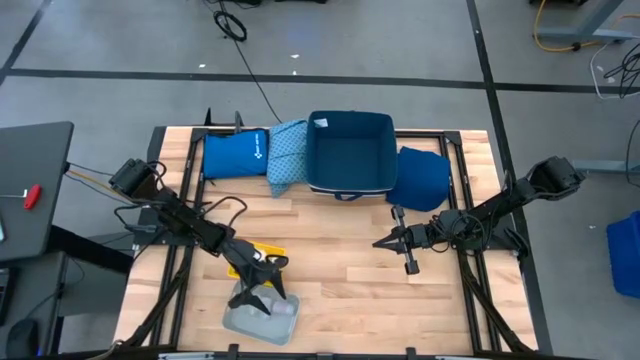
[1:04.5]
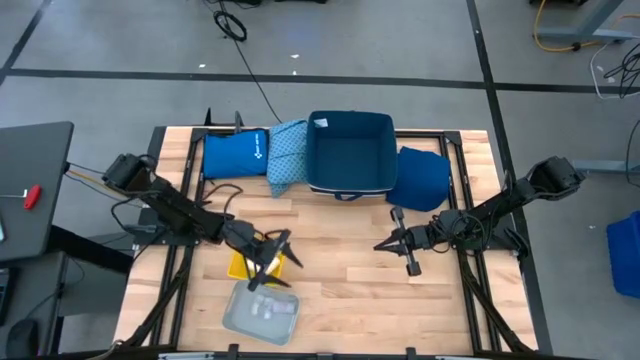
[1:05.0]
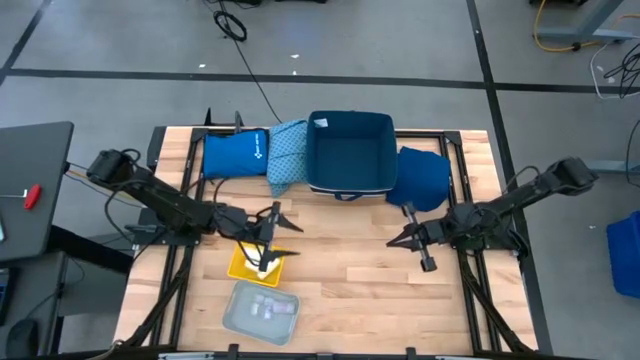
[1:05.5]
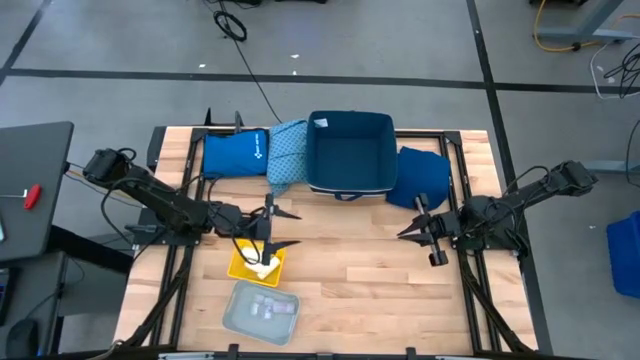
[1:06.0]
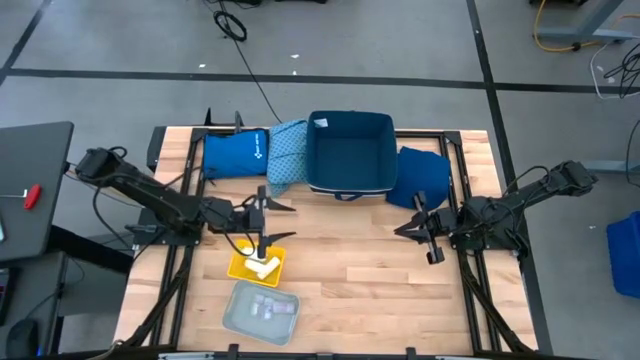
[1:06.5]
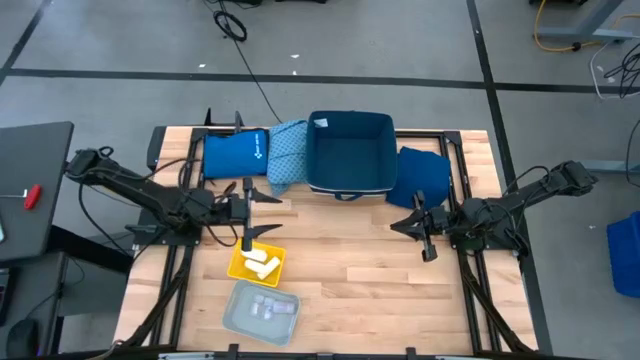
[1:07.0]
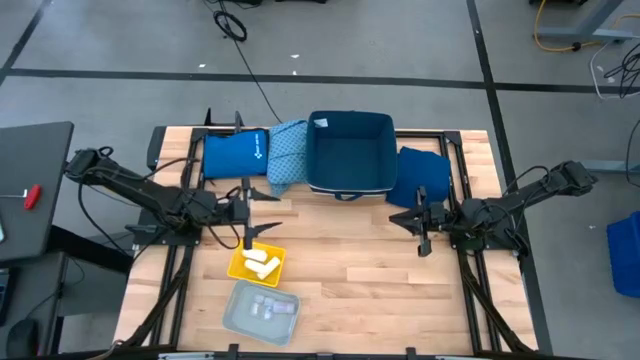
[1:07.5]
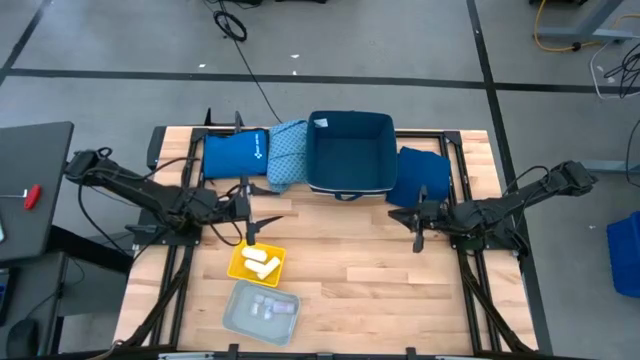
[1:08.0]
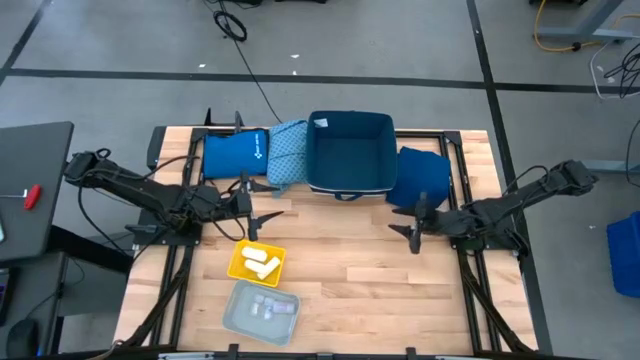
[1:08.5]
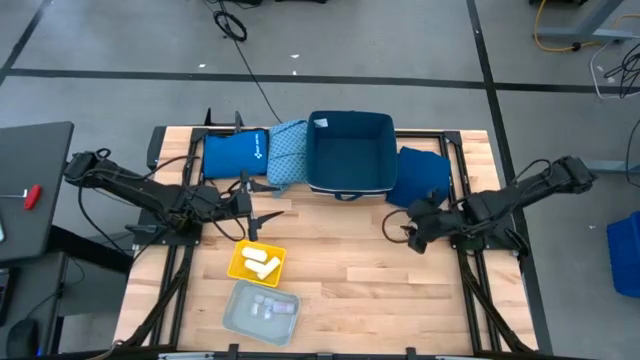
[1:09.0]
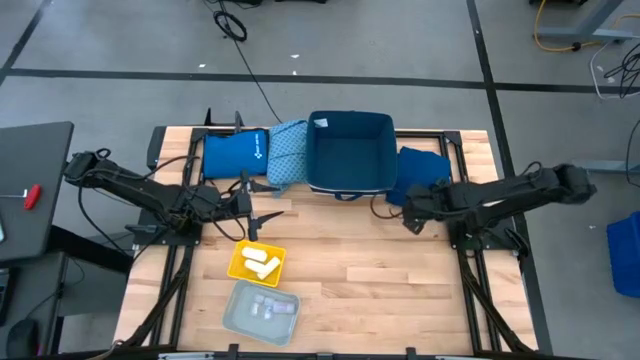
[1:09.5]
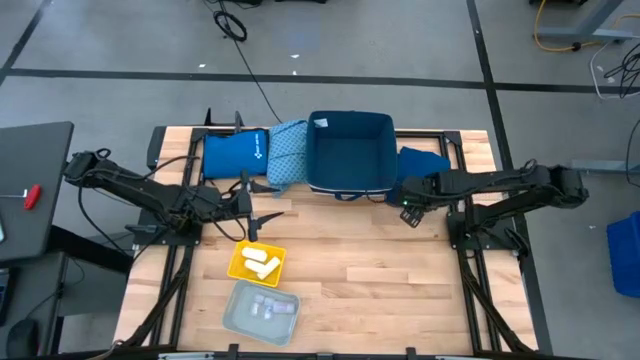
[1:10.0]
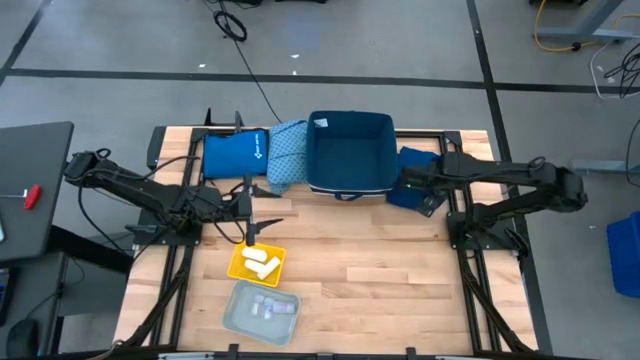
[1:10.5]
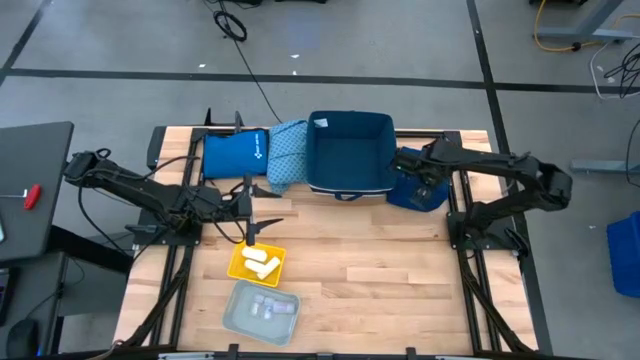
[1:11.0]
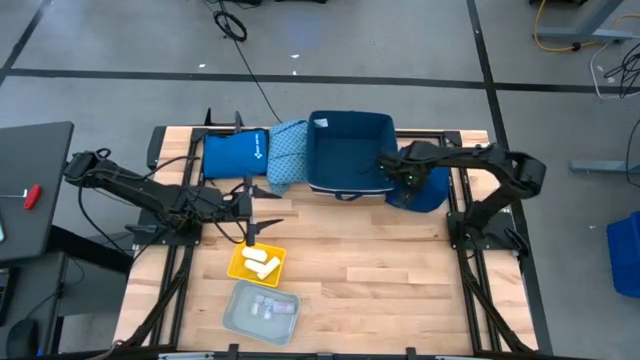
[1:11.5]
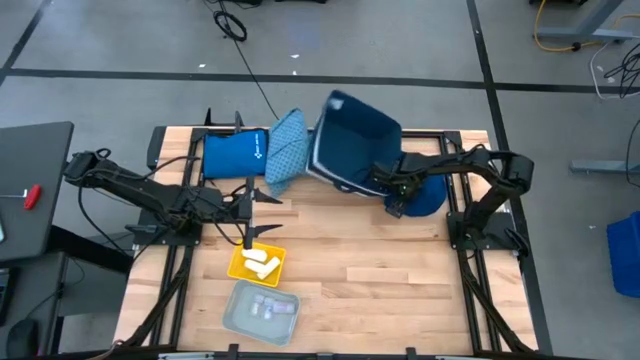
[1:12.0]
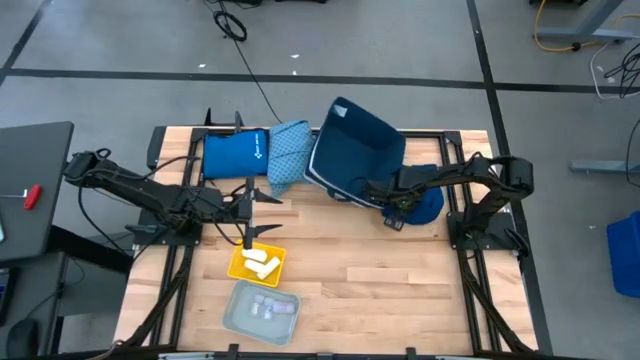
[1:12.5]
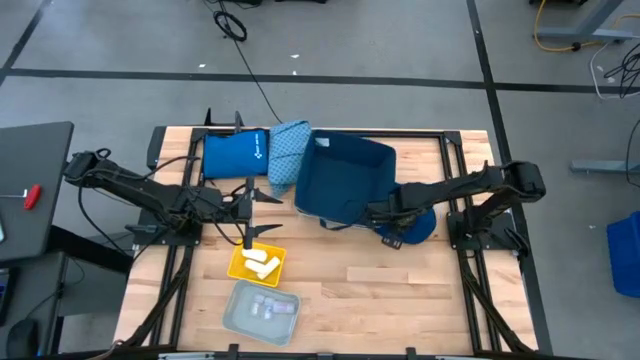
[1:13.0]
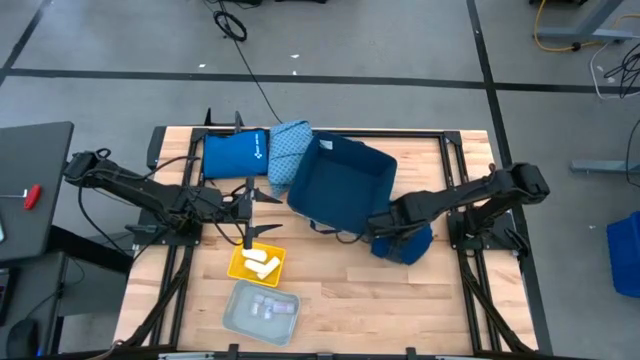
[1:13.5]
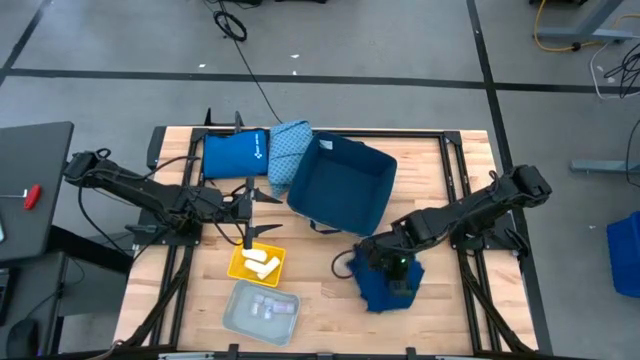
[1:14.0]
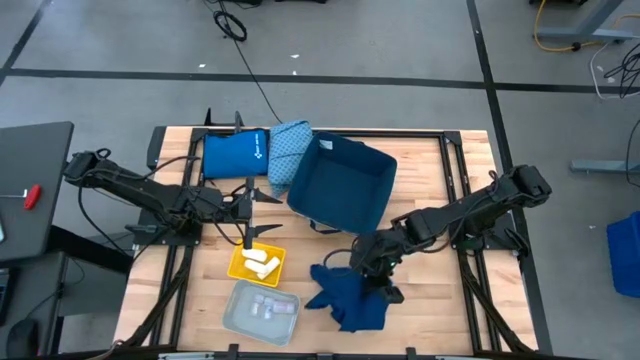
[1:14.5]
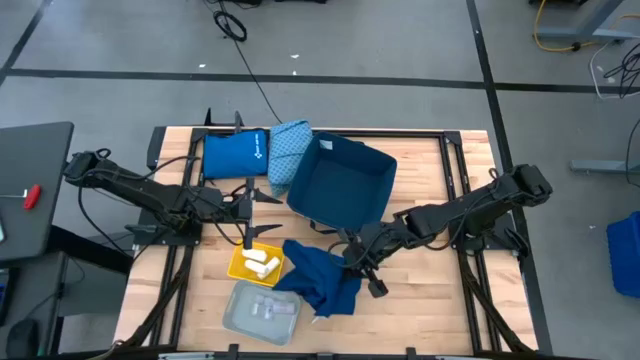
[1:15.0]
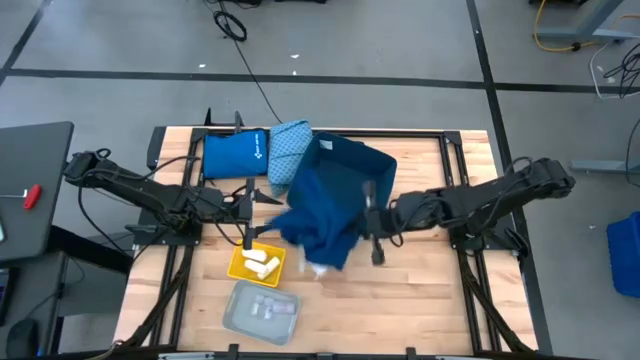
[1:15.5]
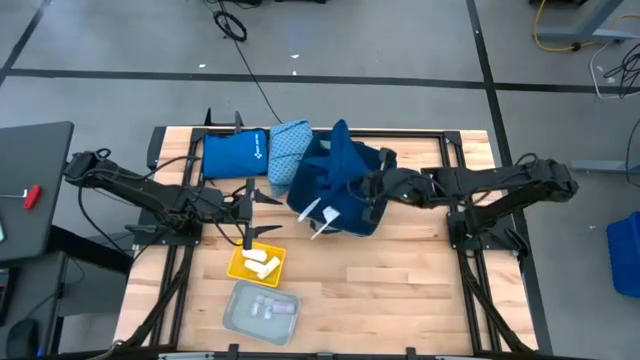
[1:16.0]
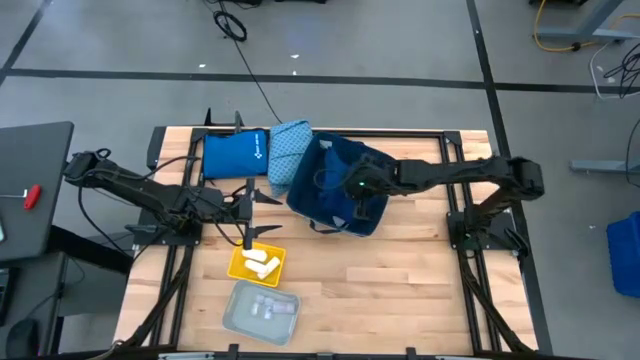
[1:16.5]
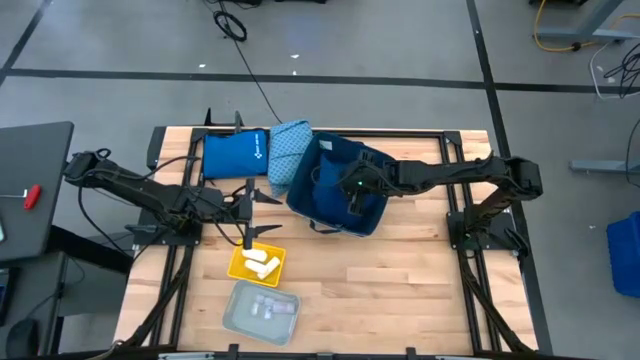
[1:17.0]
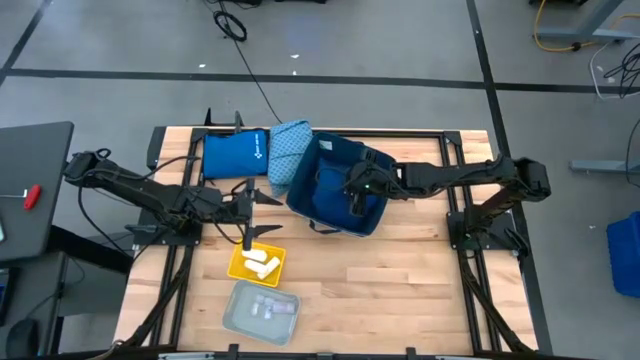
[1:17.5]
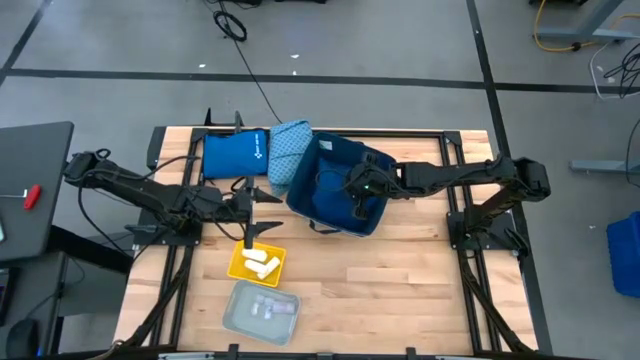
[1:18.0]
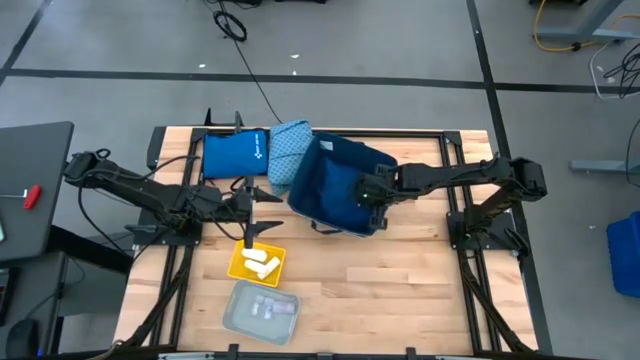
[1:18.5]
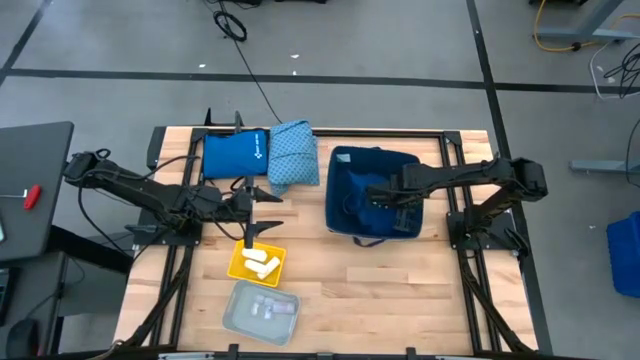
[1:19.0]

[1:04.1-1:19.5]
Task: Pick & place medical supplies in basket/bin
Put the dark blue patient gown into the blue bin

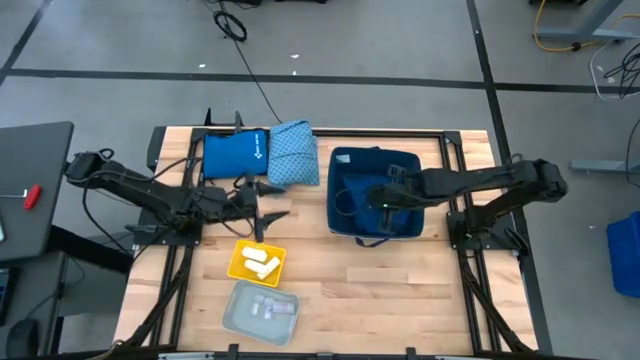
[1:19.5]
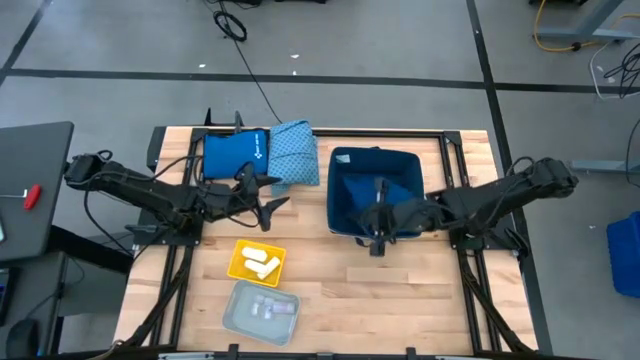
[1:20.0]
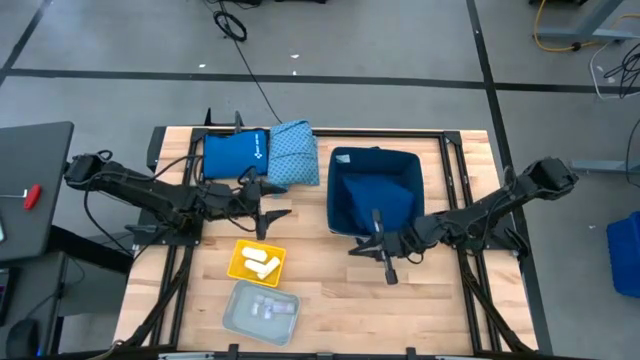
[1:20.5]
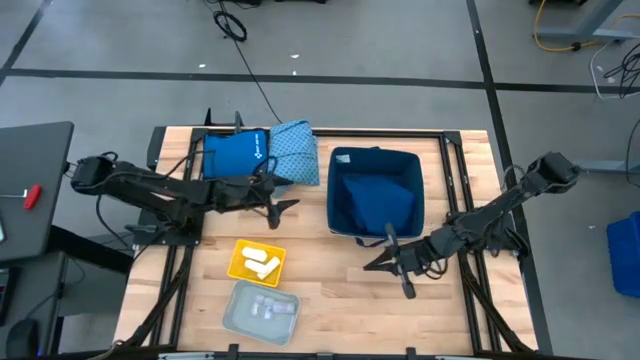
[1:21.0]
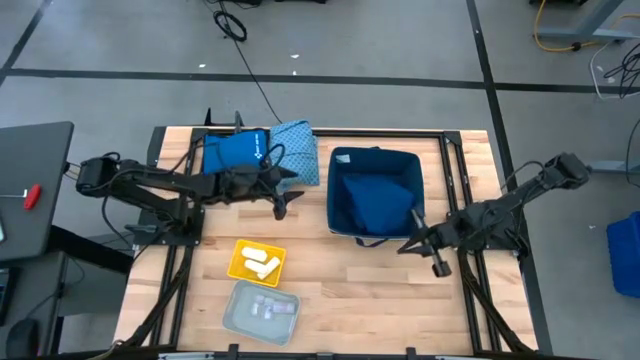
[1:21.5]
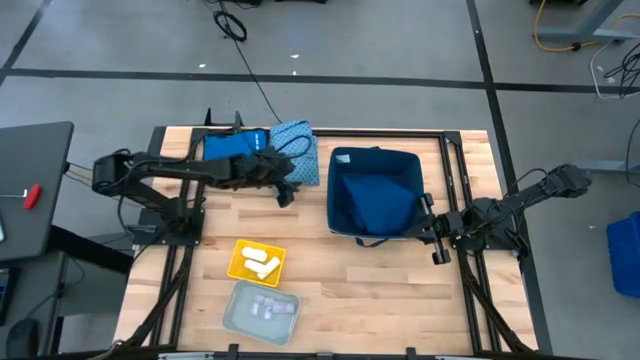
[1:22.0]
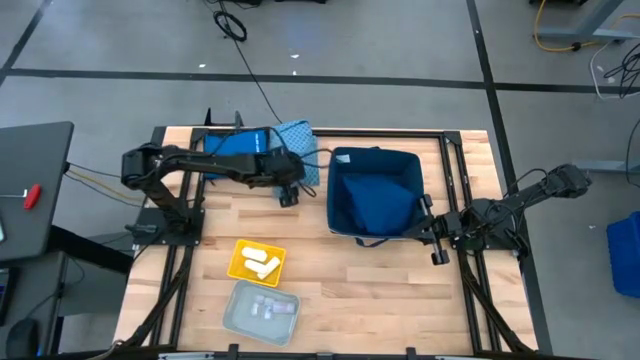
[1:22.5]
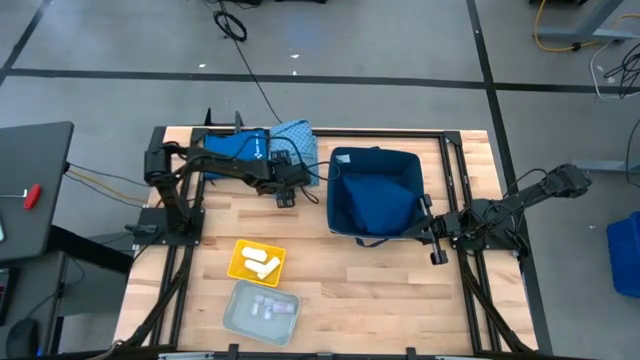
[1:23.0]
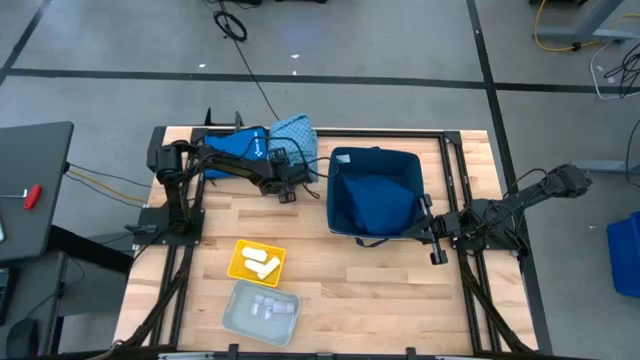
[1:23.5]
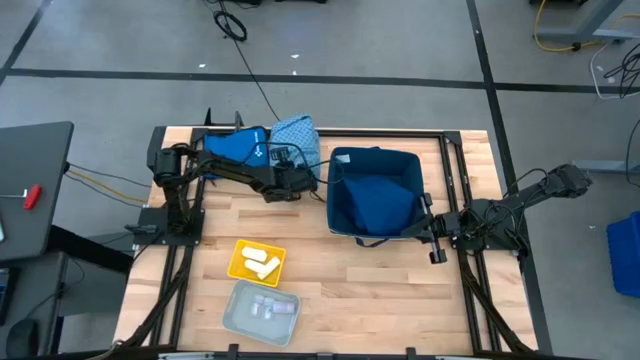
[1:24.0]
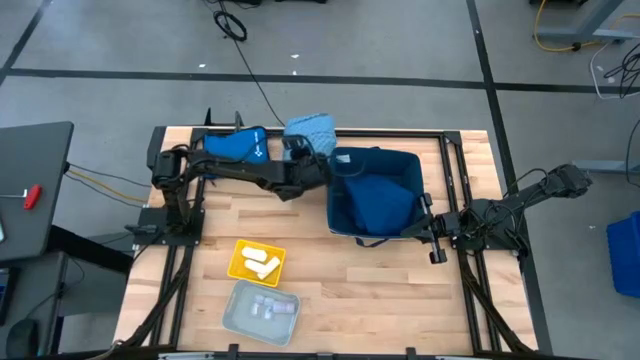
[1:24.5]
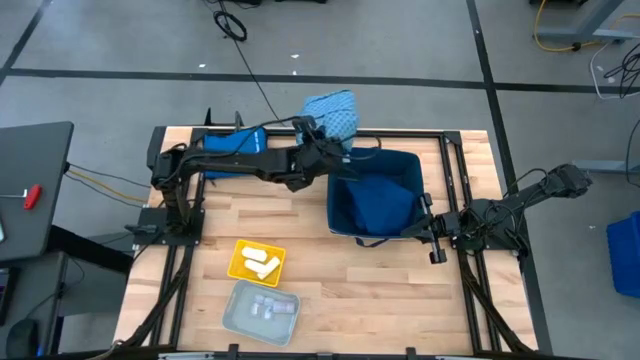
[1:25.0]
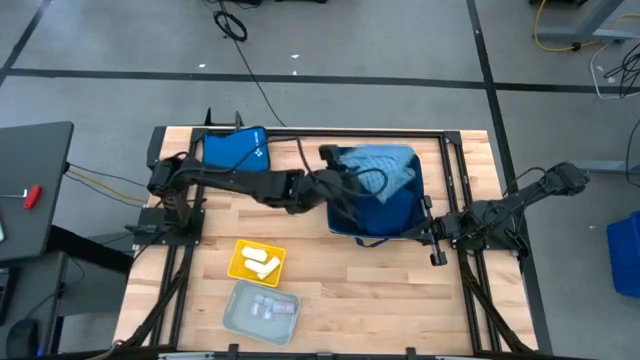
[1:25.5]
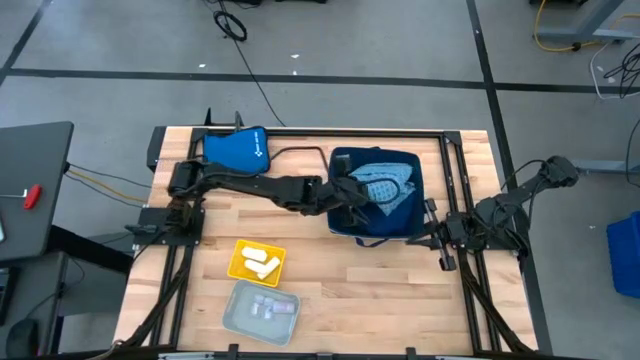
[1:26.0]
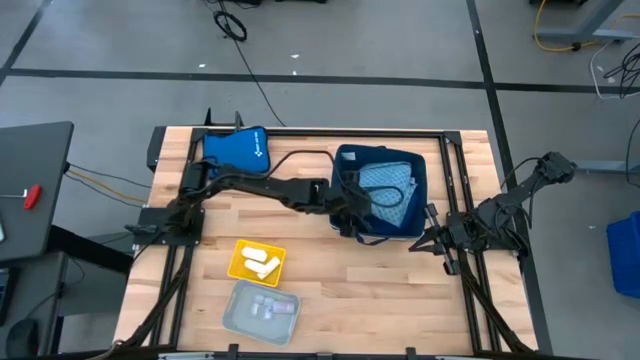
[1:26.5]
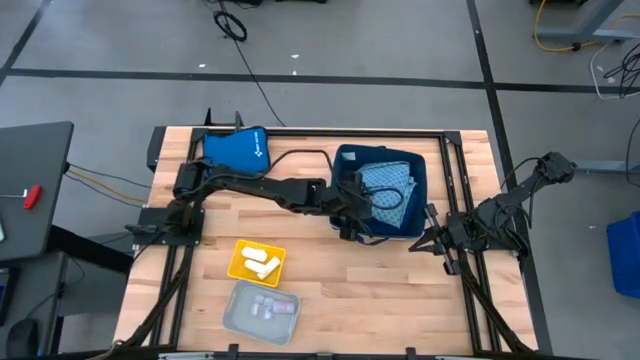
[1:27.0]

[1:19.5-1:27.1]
Put the light blue patient gown into the blue bin
